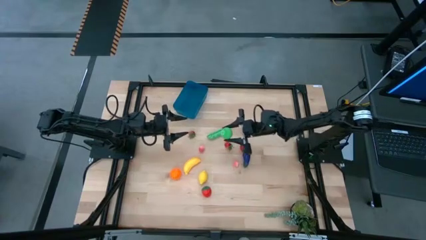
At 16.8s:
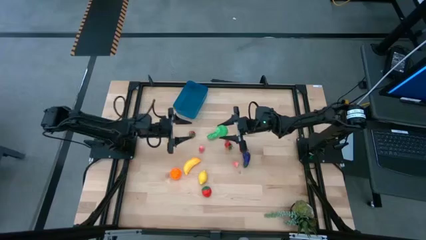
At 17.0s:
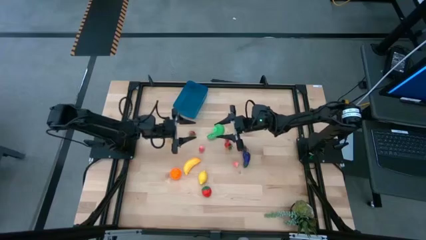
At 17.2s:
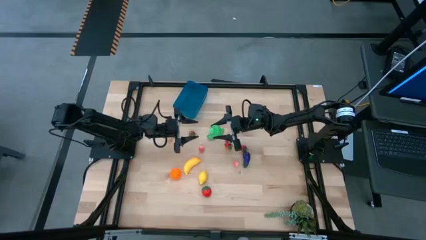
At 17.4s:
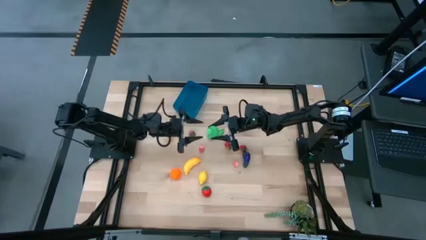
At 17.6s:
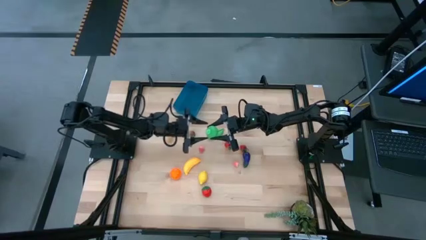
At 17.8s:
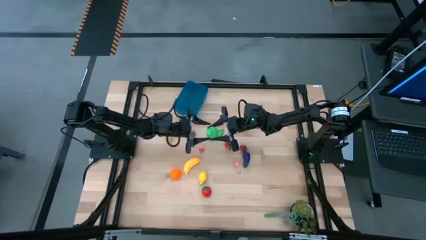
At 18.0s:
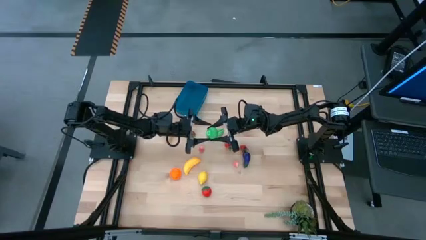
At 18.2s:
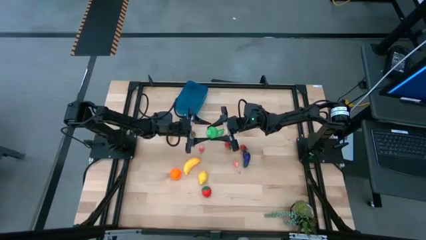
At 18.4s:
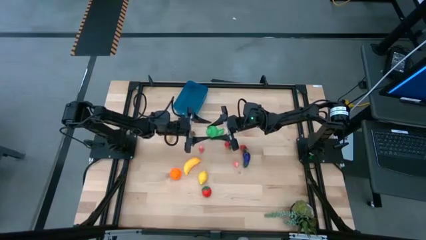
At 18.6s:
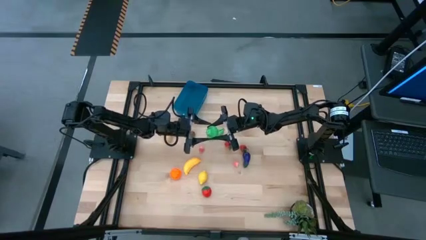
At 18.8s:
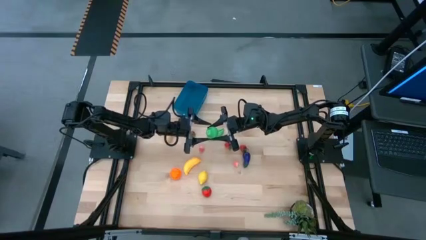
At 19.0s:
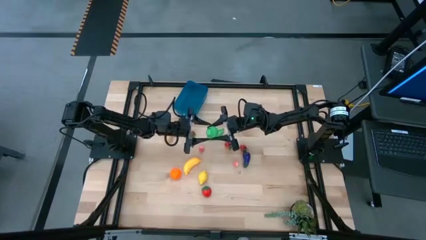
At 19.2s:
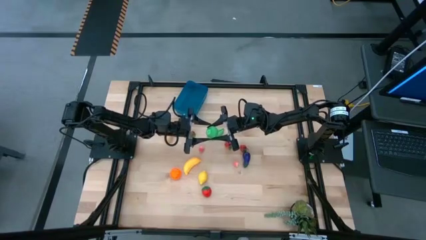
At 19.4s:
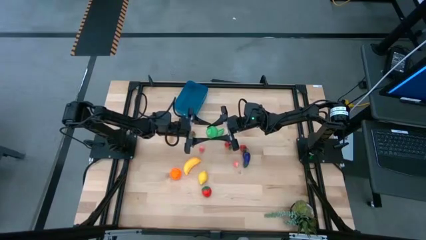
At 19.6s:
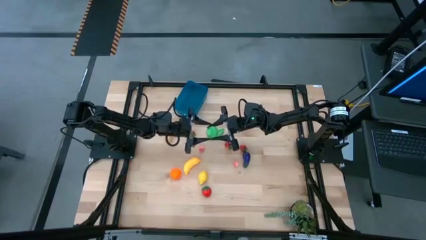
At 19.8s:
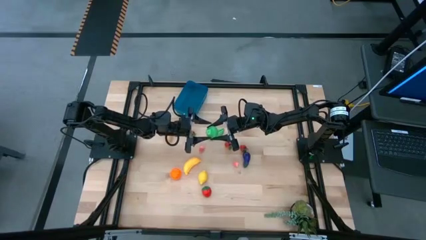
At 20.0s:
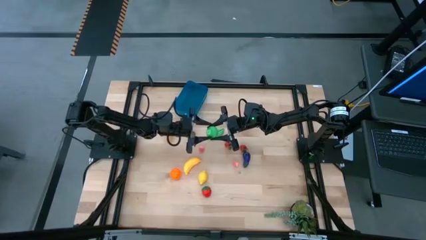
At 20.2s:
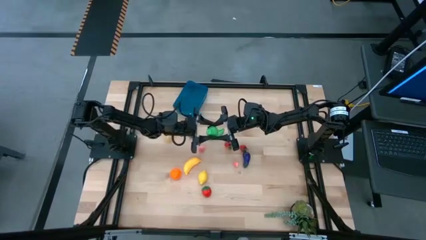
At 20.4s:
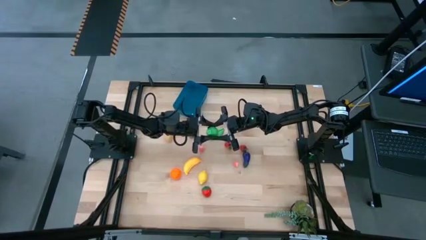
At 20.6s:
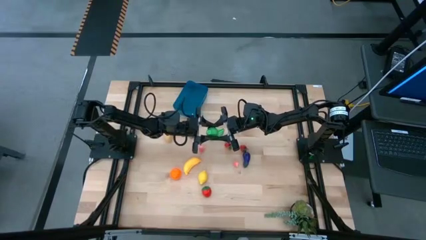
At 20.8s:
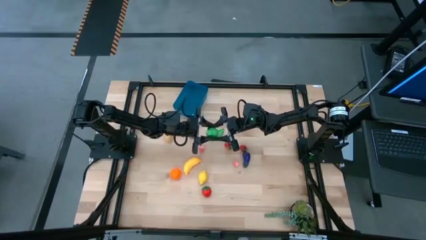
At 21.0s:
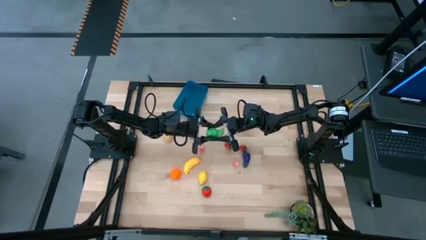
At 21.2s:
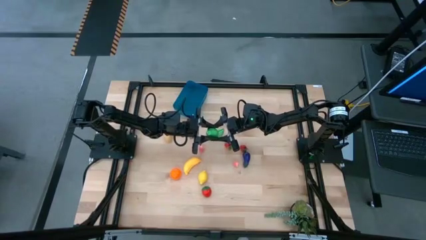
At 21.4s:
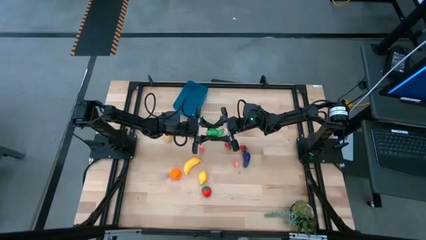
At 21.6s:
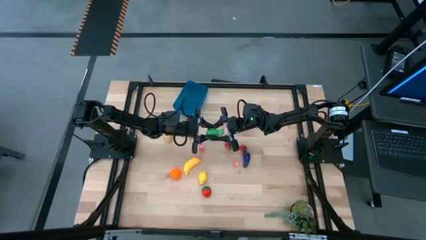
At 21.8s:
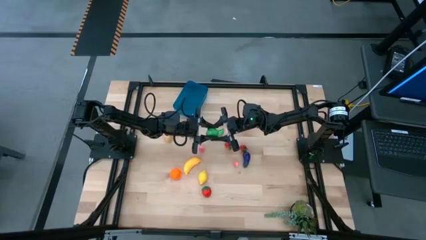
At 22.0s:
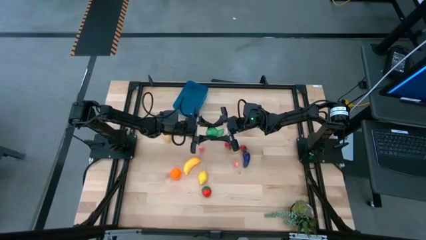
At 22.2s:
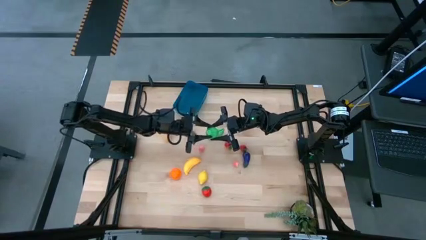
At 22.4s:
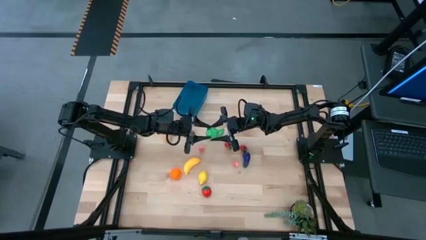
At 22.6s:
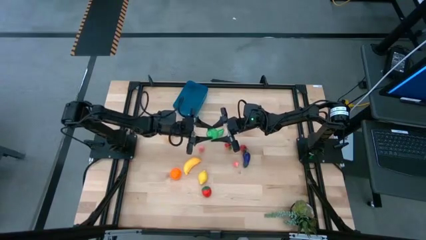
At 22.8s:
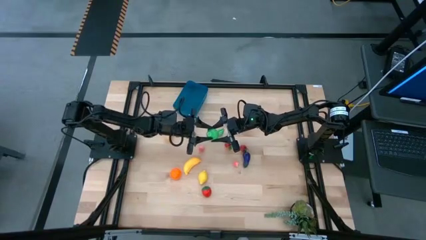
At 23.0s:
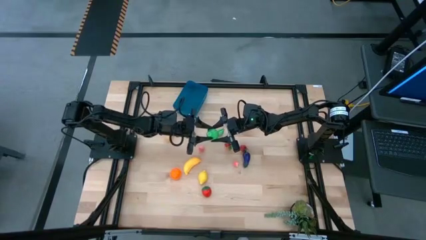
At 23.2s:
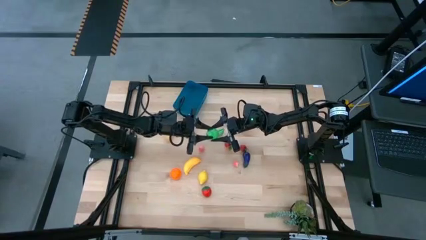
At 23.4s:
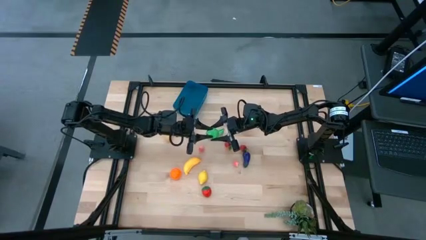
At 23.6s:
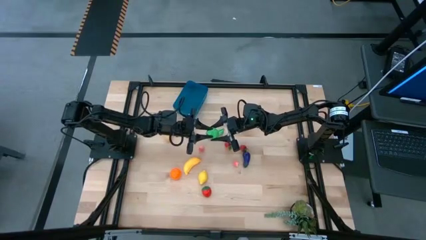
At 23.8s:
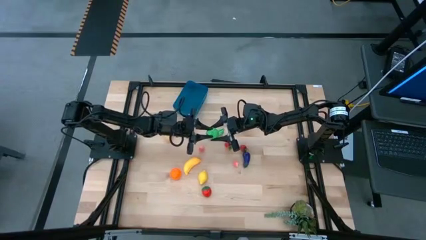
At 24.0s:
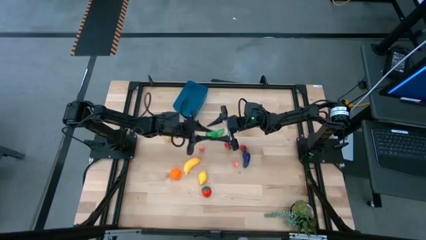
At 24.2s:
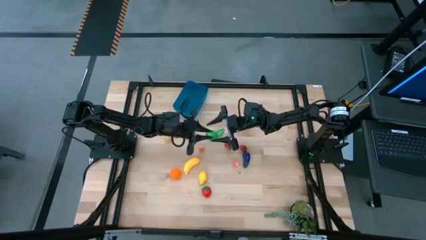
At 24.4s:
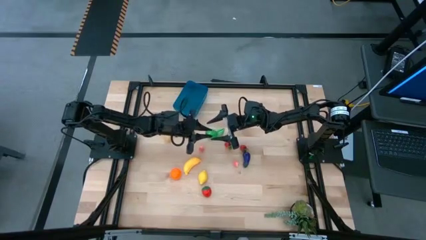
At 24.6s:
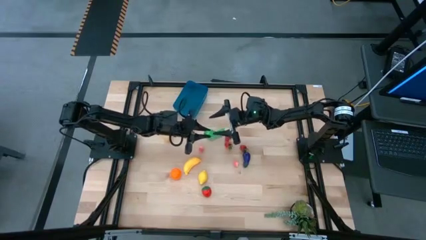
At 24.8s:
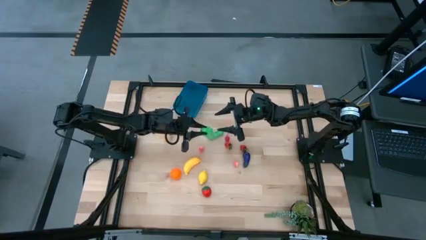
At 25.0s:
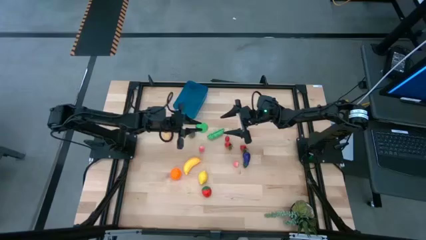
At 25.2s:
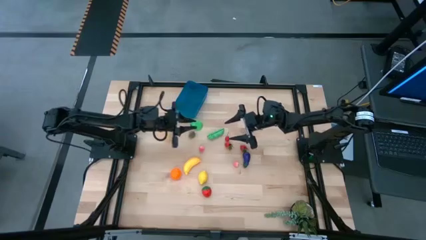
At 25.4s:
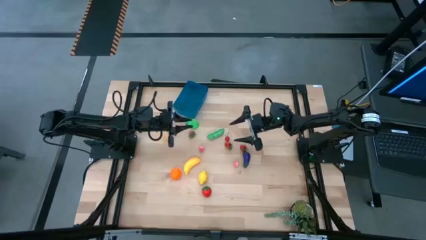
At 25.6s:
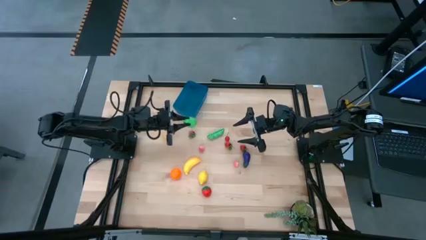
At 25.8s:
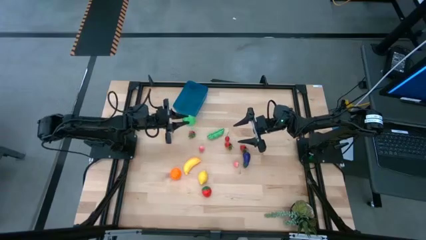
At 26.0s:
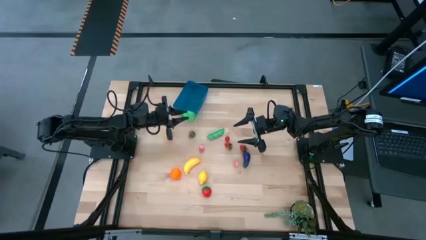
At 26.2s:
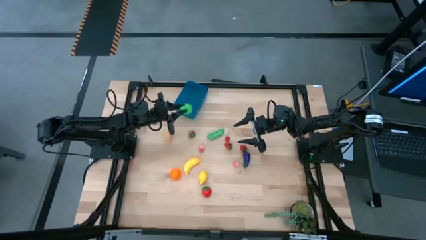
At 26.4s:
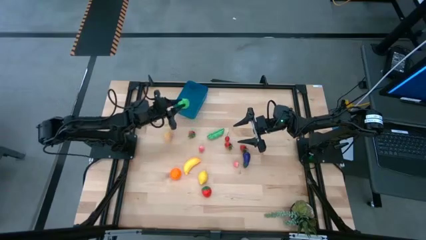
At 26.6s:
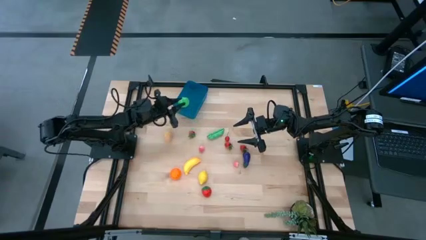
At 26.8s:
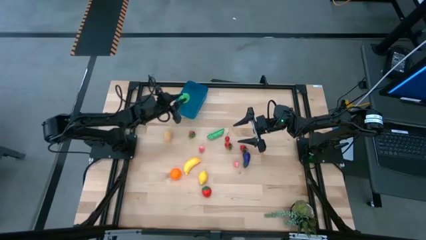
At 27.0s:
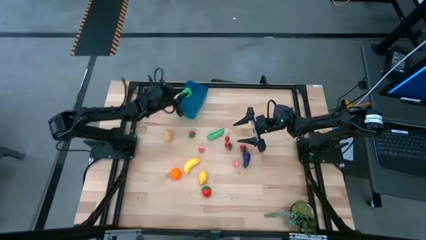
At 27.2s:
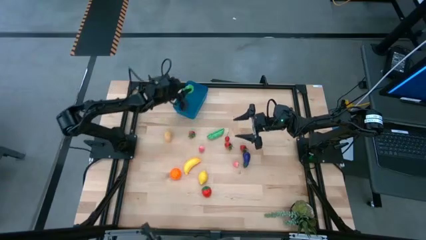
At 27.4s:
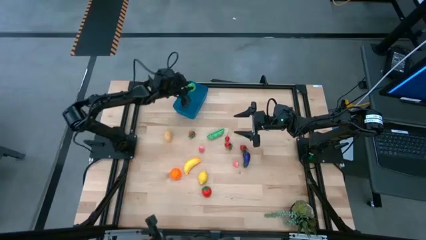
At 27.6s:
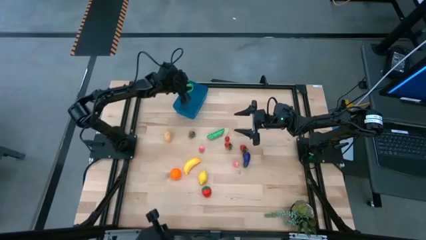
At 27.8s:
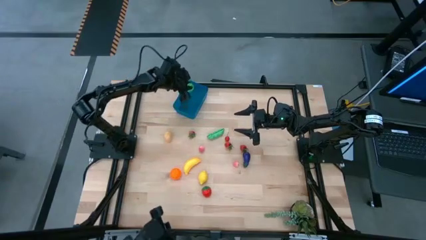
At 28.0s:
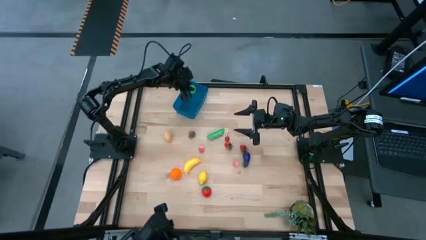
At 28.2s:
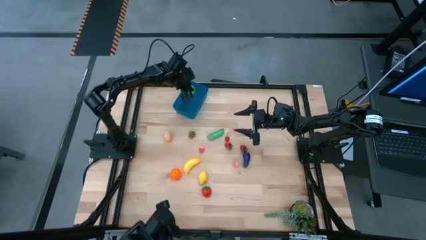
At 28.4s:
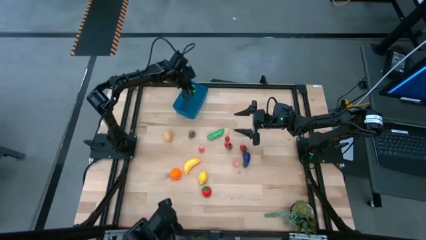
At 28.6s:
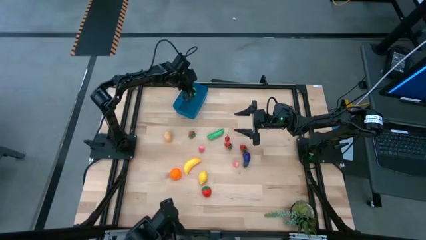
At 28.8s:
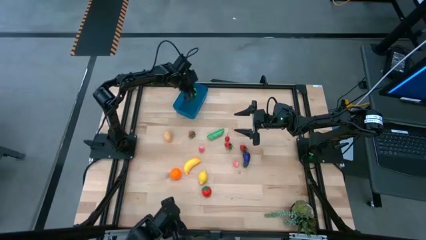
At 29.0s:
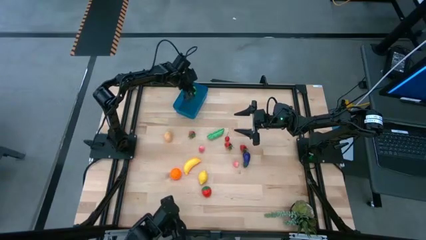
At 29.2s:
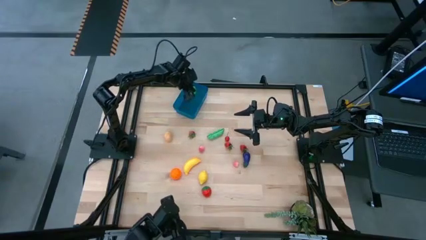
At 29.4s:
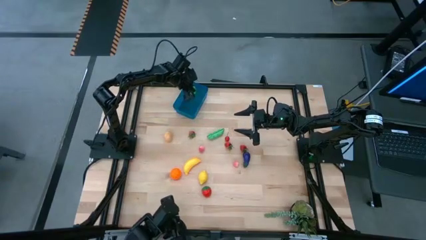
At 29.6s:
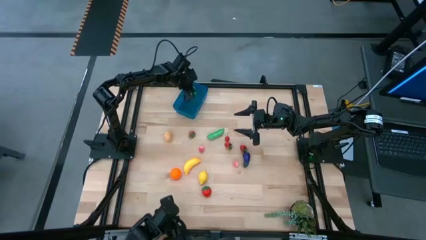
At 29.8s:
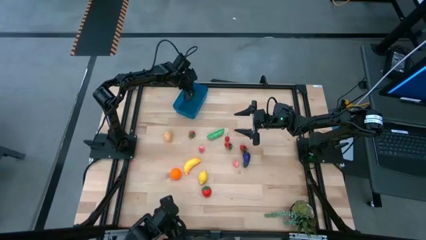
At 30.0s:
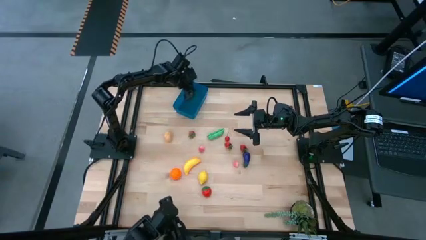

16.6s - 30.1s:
Task: Pick and placing Produce into tupperware
Put the green pear into the blue bin
